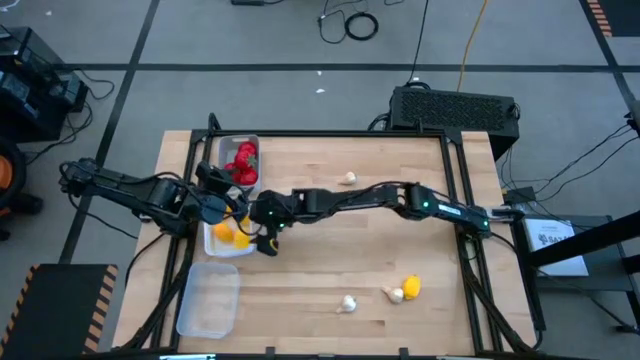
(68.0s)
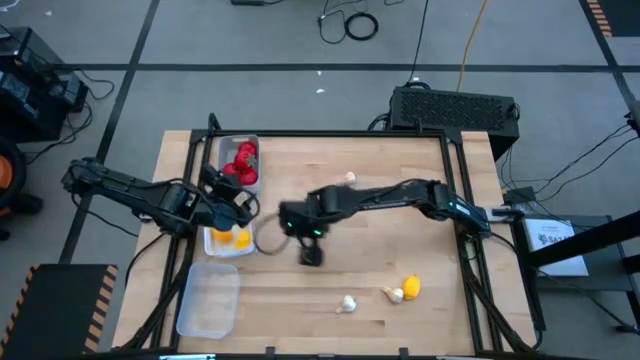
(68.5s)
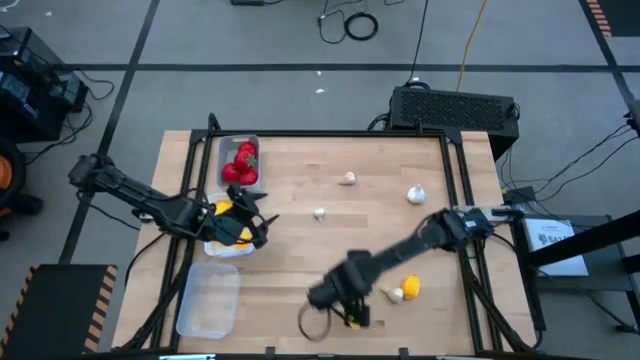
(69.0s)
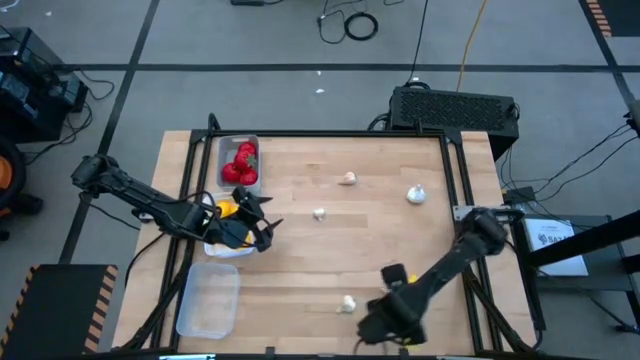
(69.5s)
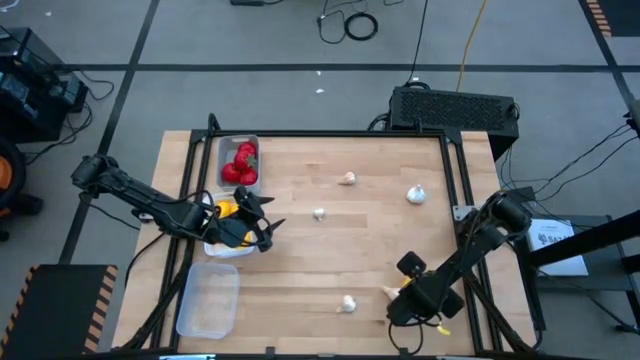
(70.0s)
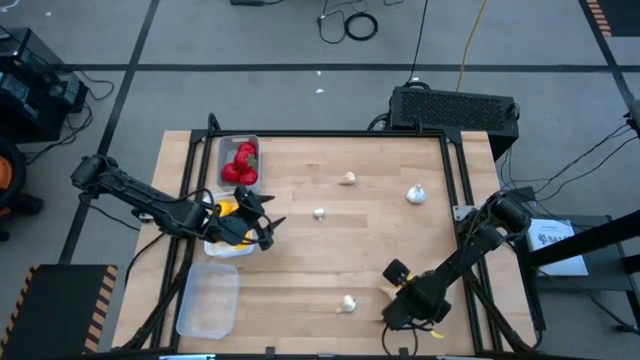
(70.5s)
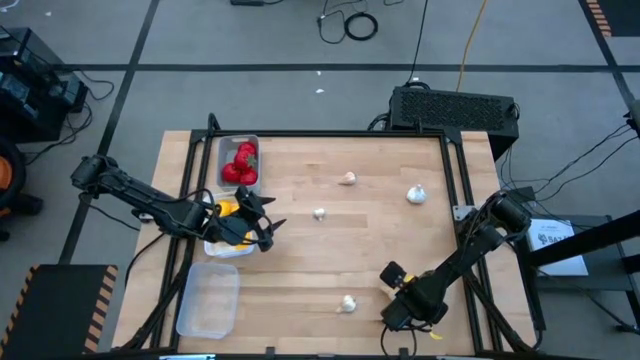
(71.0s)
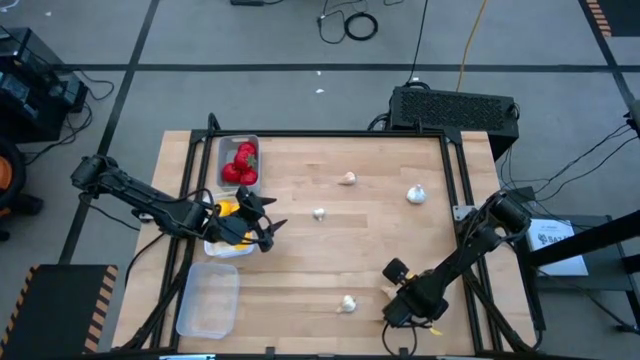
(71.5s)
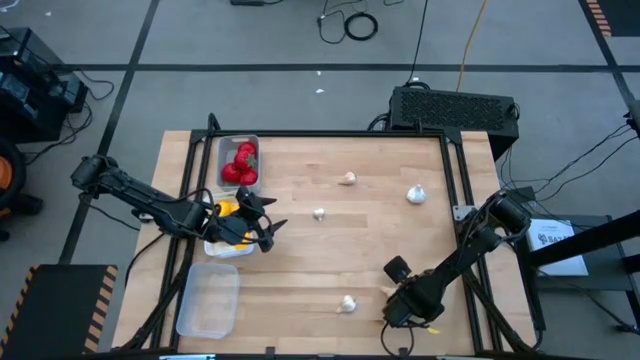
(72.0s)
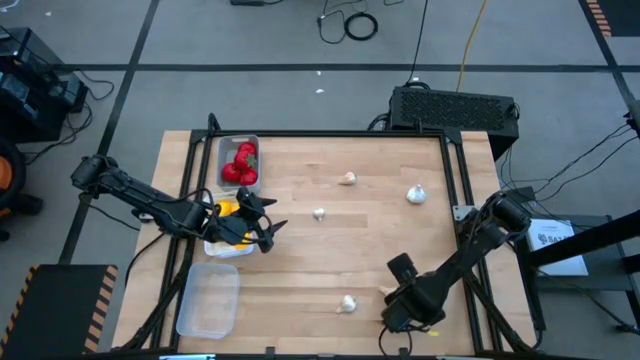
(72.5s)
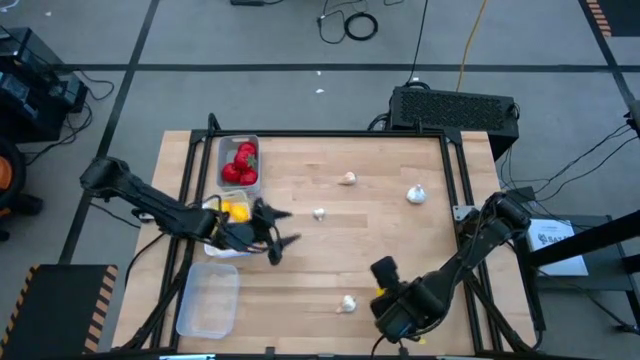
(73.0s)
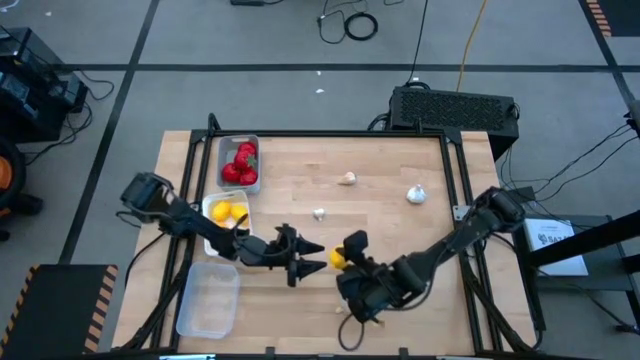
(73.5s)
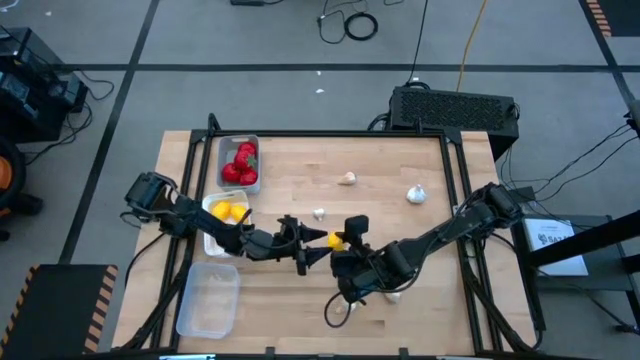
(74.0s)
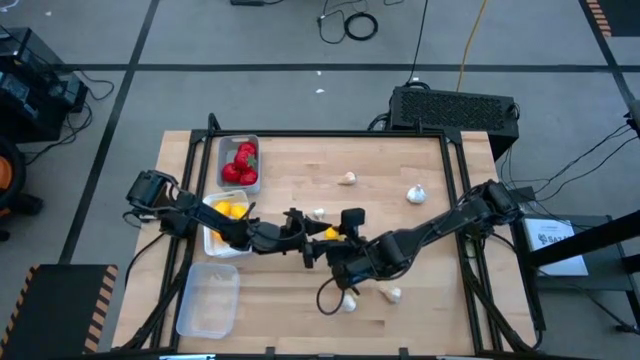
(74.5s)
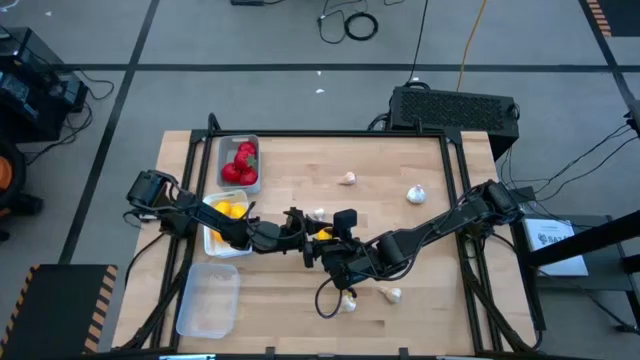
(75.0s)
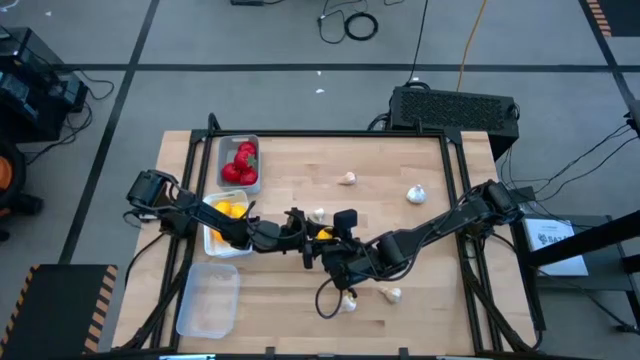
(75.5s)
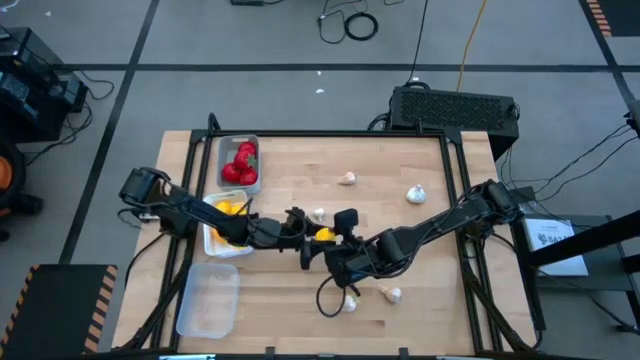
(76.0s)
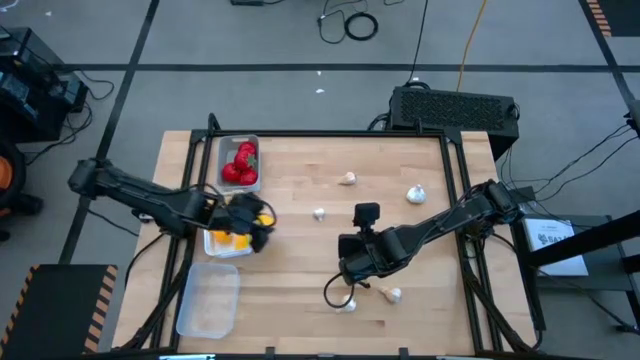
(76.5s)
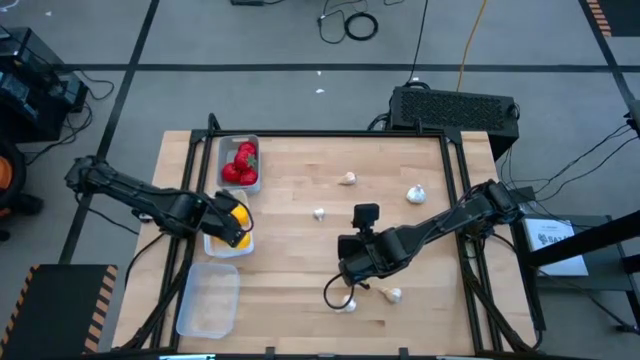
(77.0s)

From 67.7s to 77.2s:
Task: Sort produce into baskets
Put the lemon into the white bin

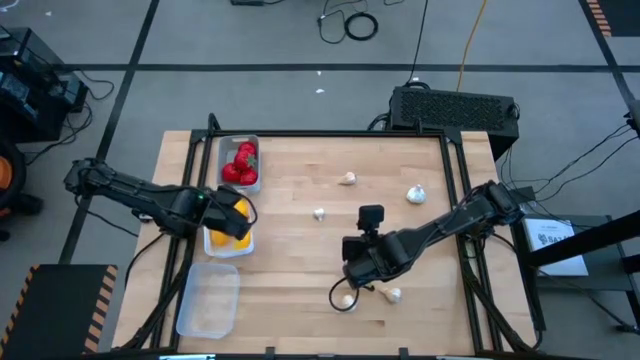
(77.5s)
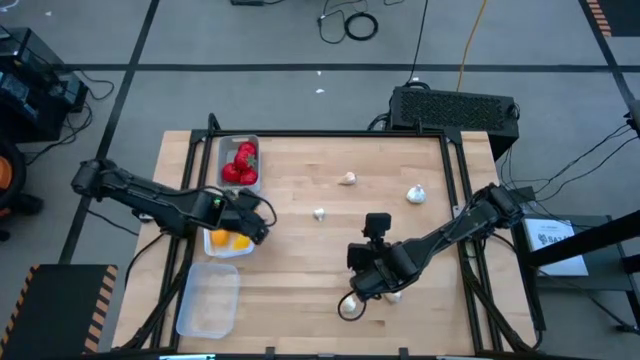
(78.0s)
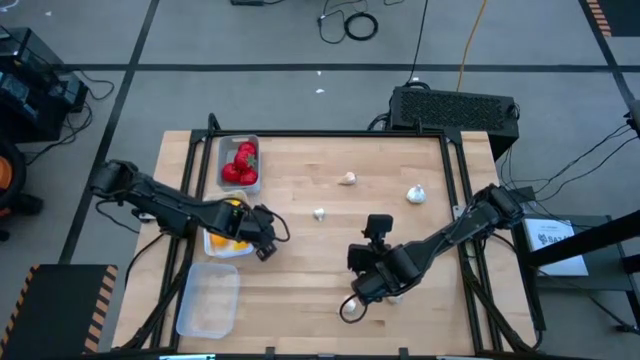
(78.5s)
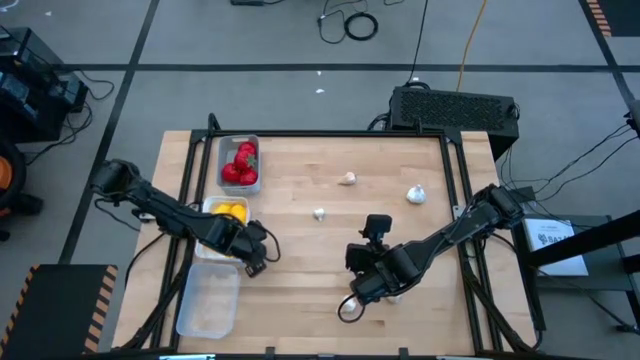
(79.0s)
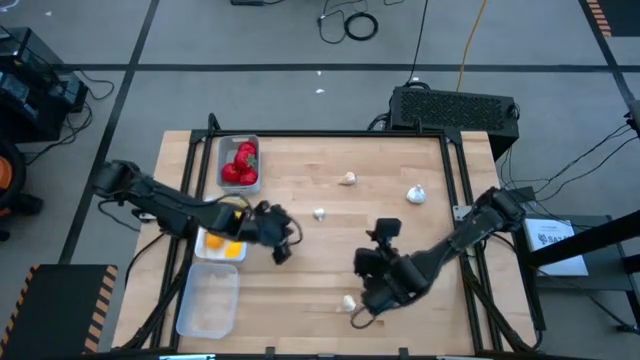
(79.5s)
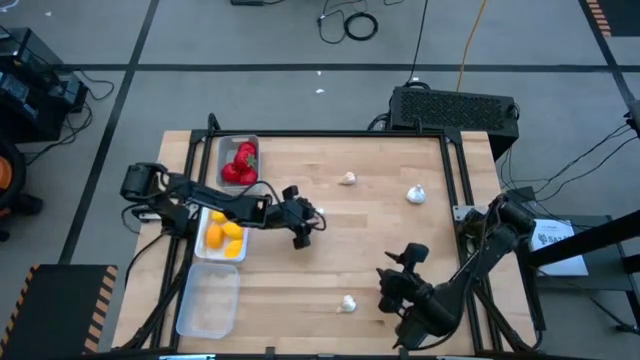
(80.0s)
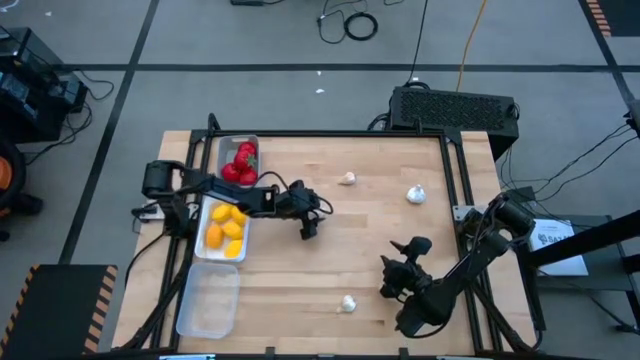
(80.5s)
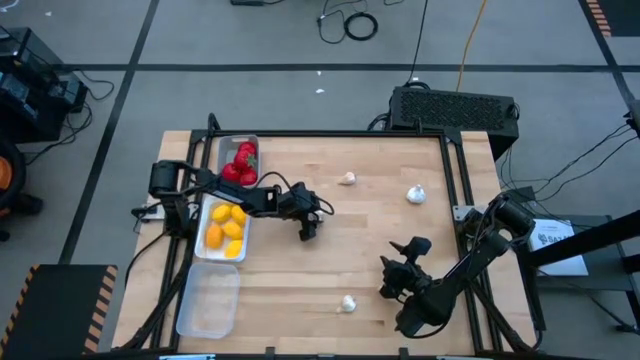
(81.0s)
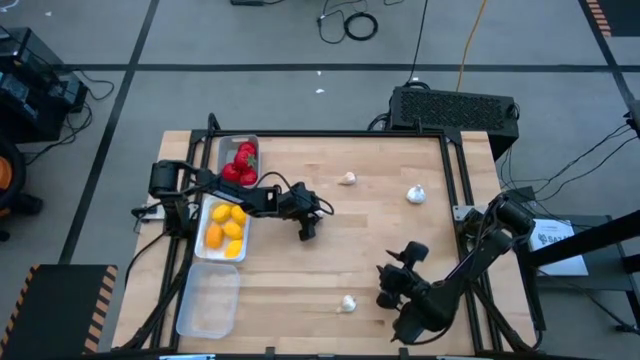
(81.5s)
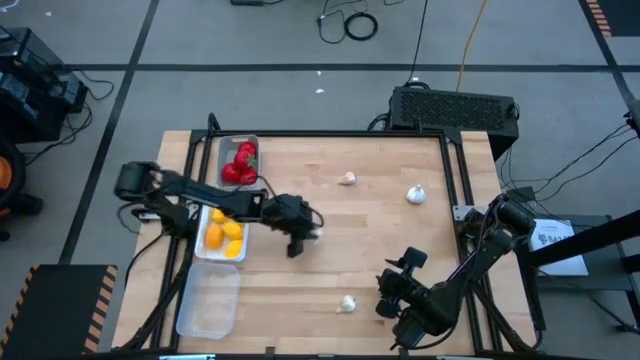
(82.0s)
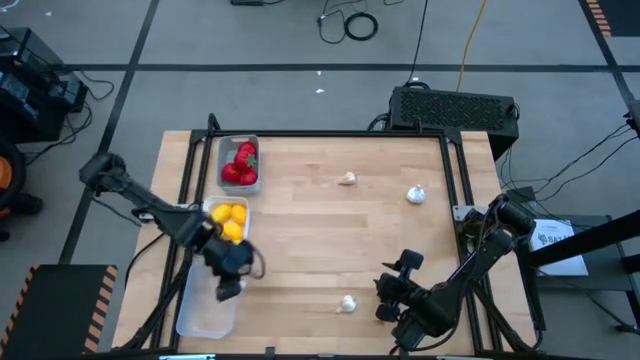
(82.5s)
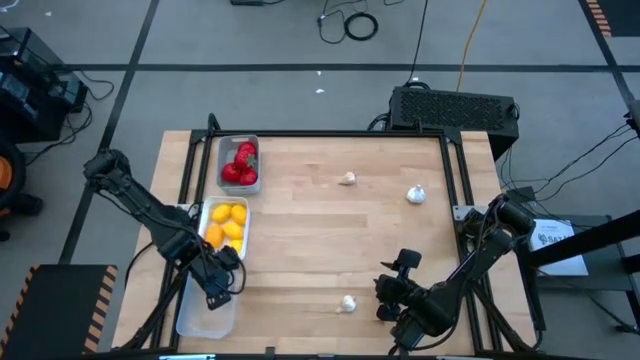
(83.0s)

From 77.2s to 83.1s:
Put the garlic into the transparent bin

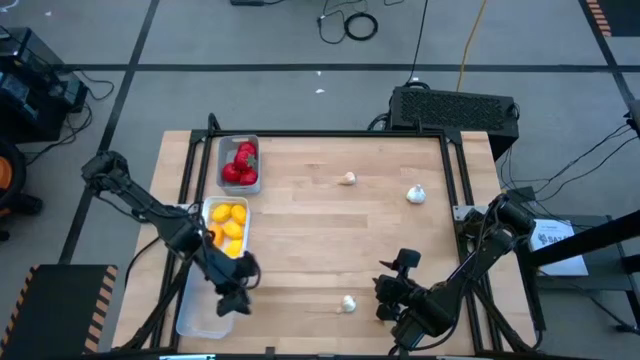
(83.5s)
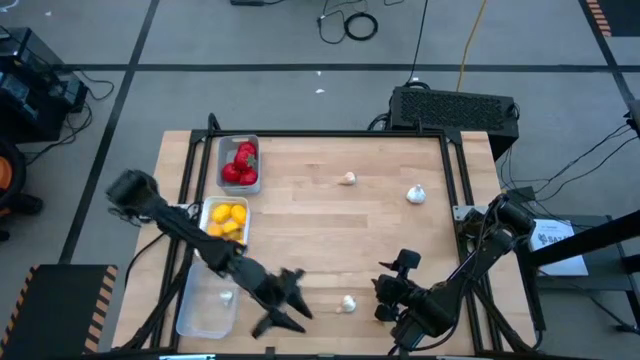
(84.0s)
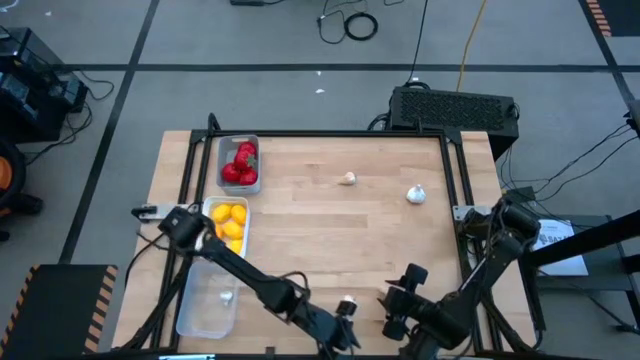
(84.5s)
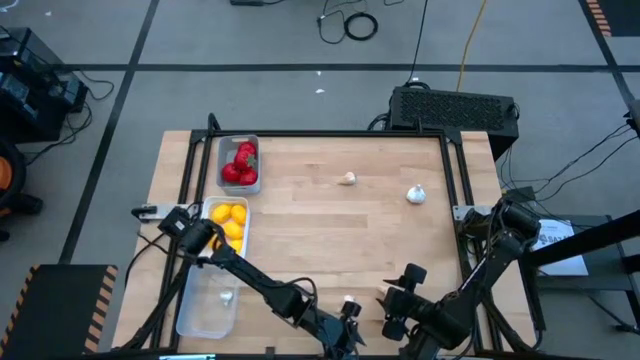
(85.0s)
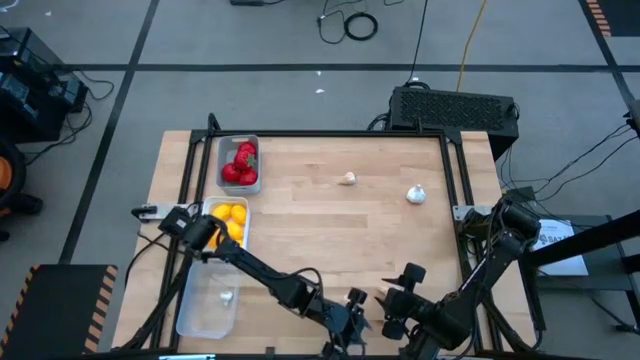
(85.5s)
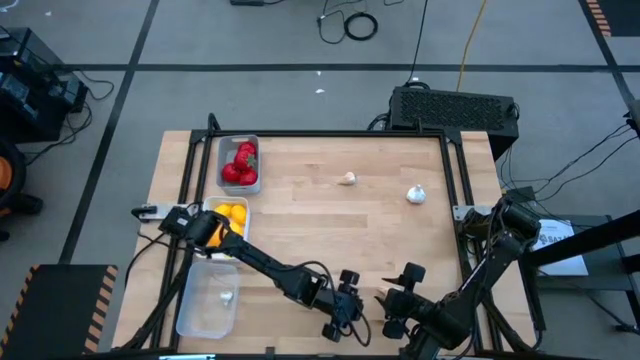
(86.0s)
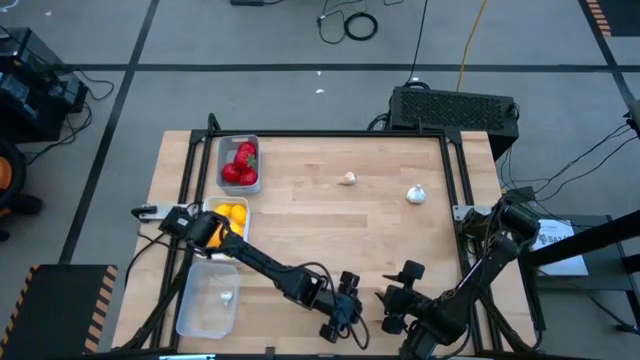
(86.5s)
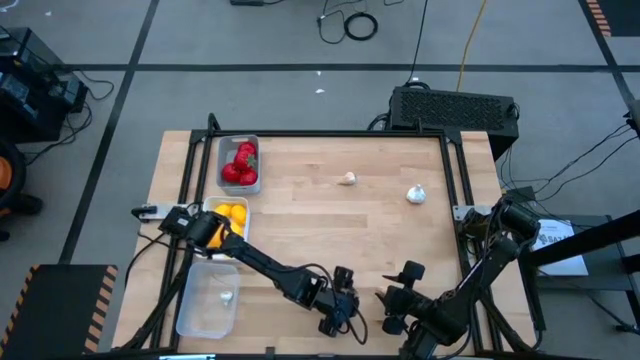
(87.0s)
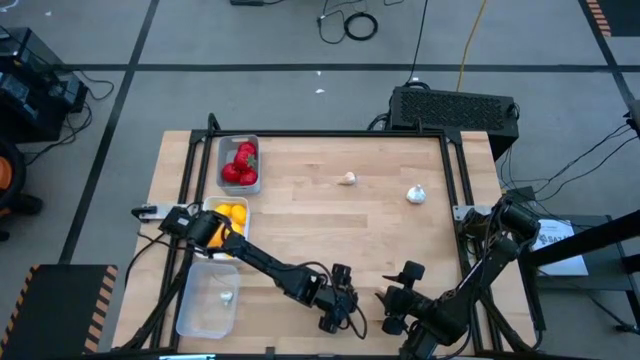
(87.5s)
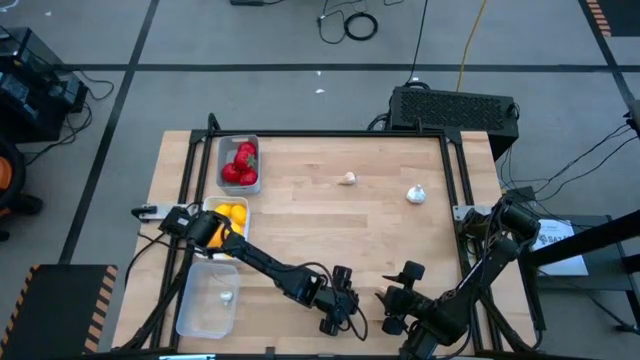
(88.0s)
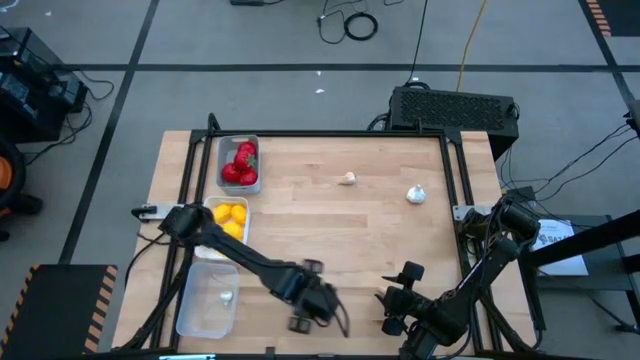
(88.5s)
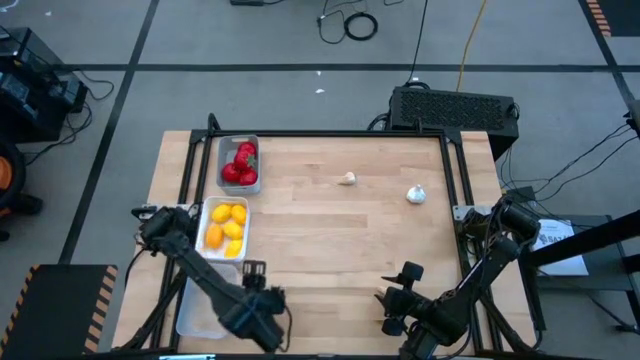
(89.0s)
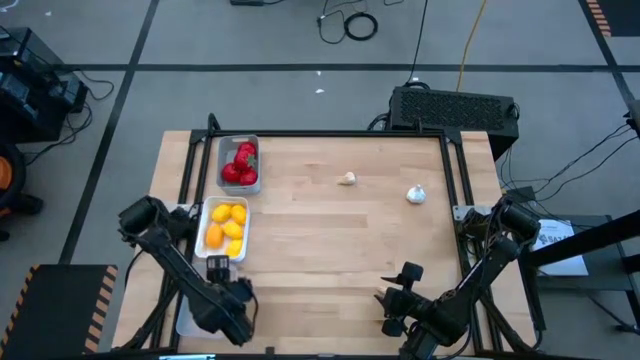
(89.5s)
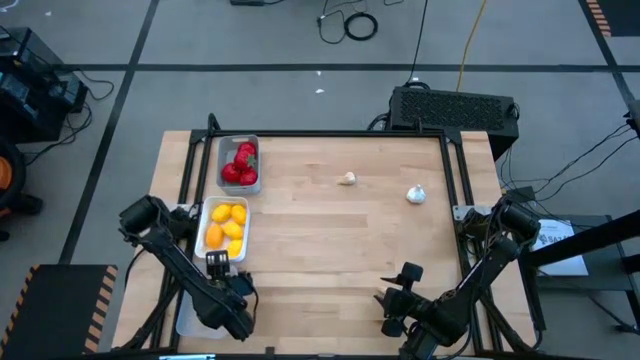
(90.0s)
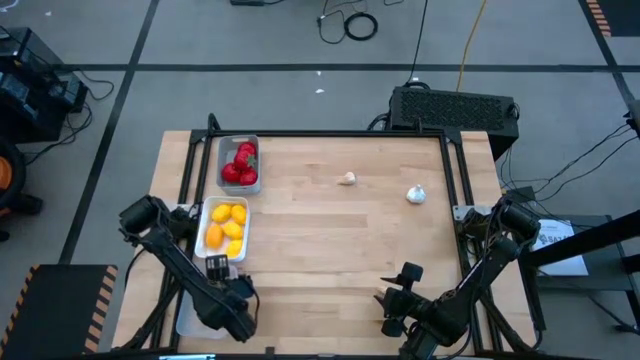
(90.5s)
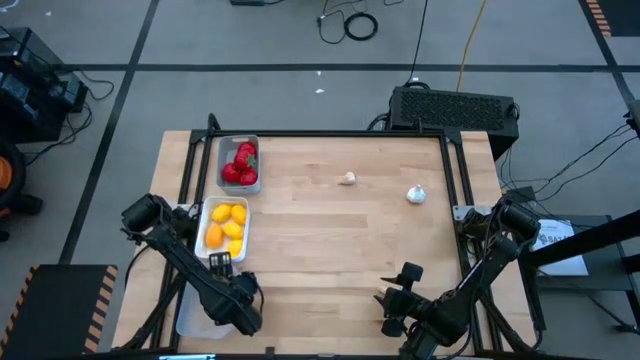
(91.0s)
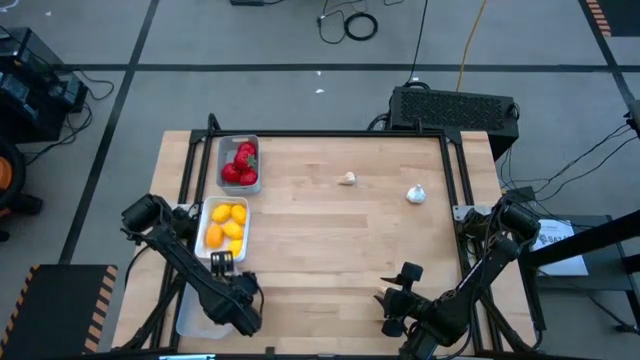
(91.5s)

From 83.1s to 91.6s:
Put the garlic into the transparent bin
